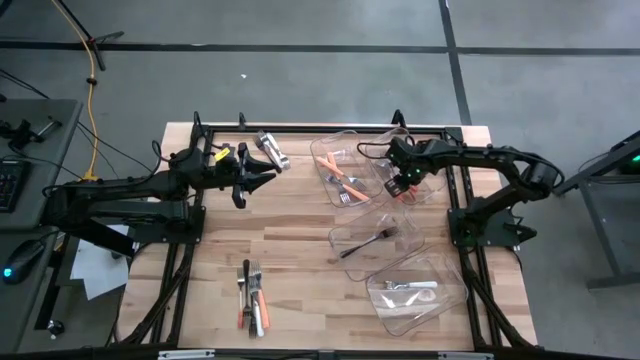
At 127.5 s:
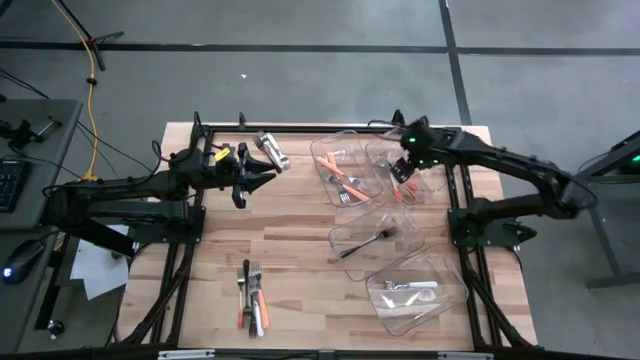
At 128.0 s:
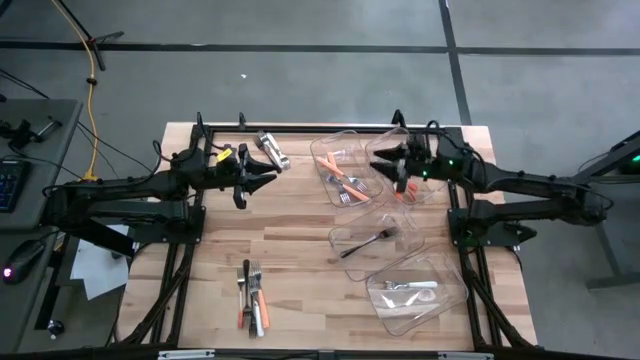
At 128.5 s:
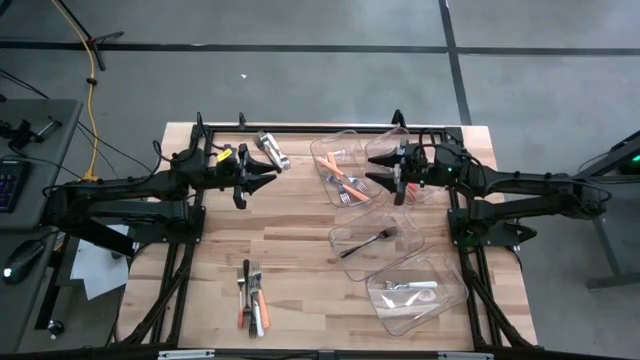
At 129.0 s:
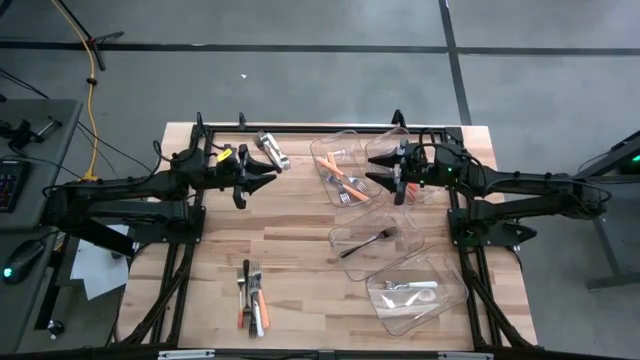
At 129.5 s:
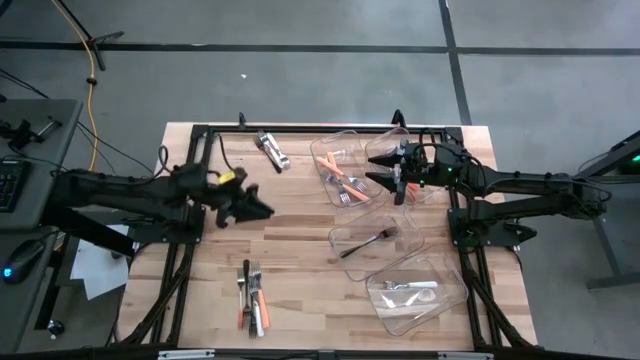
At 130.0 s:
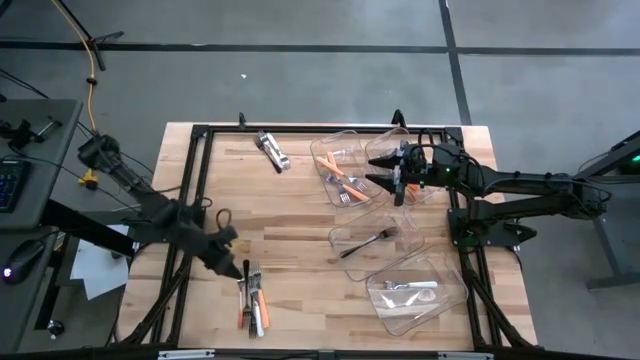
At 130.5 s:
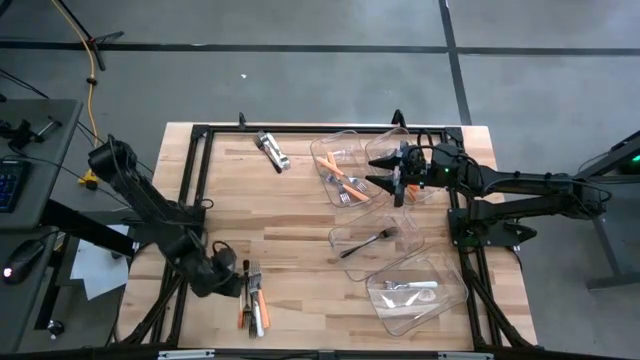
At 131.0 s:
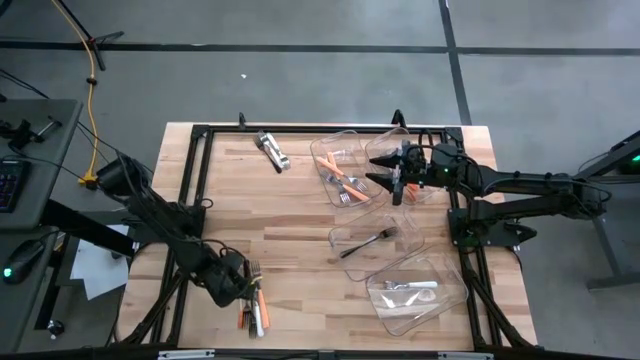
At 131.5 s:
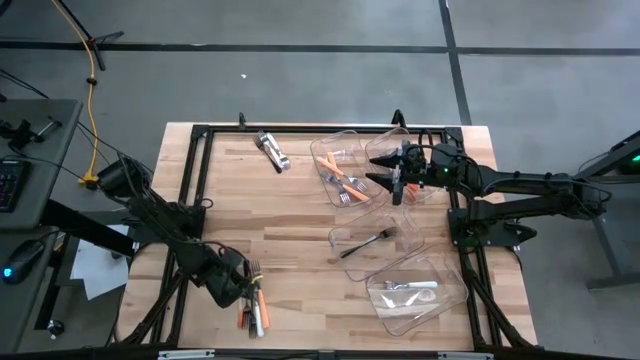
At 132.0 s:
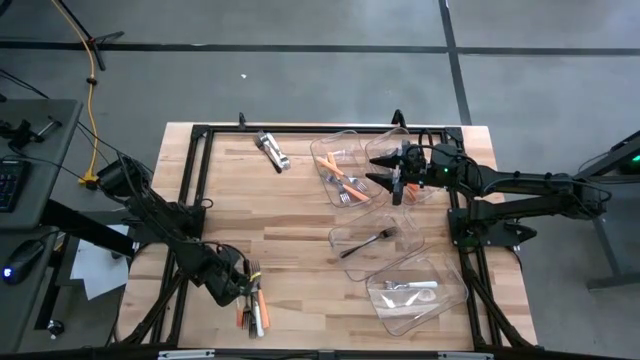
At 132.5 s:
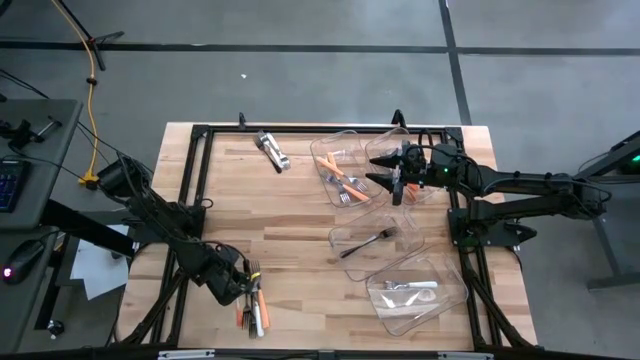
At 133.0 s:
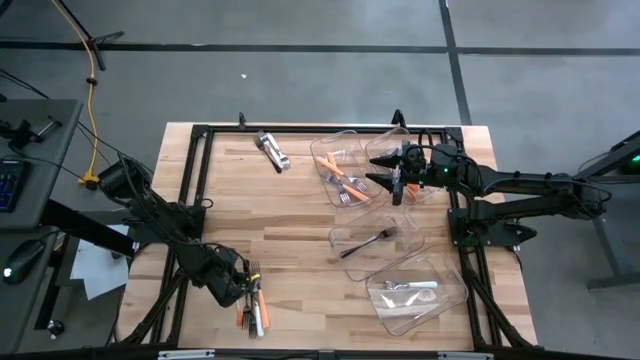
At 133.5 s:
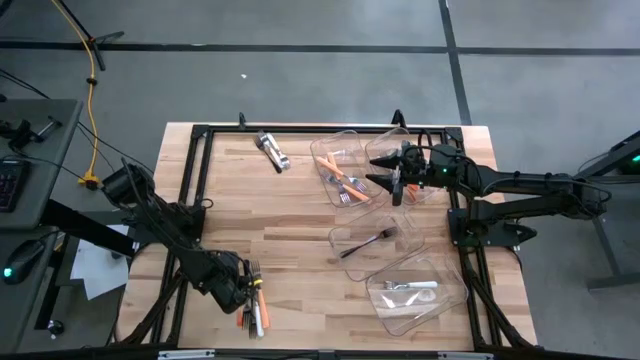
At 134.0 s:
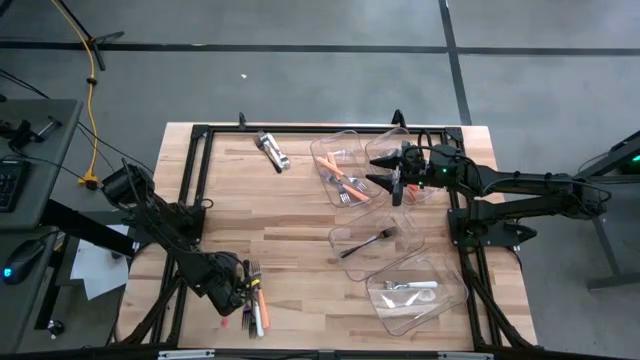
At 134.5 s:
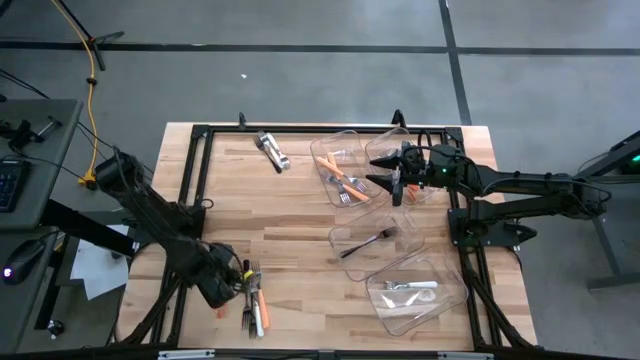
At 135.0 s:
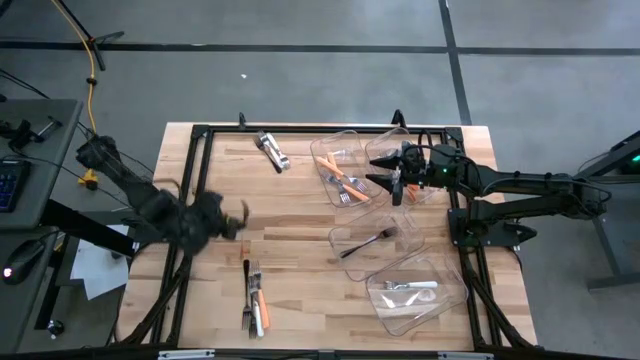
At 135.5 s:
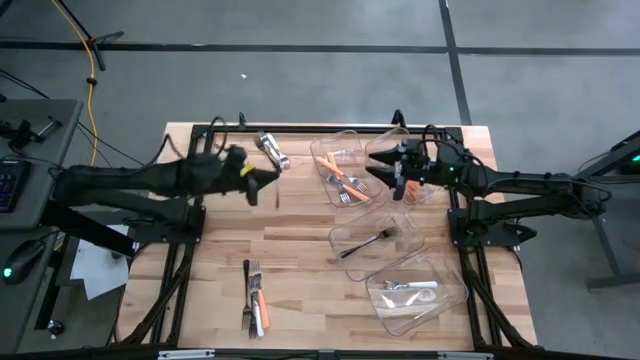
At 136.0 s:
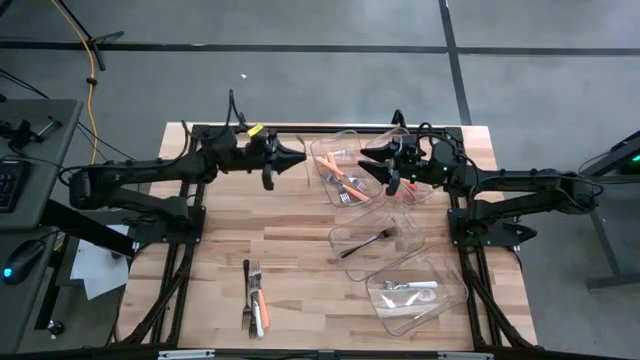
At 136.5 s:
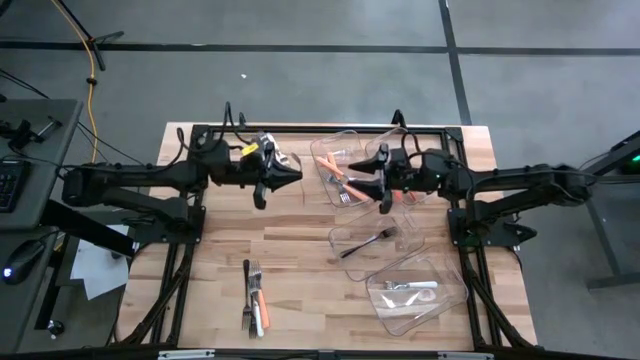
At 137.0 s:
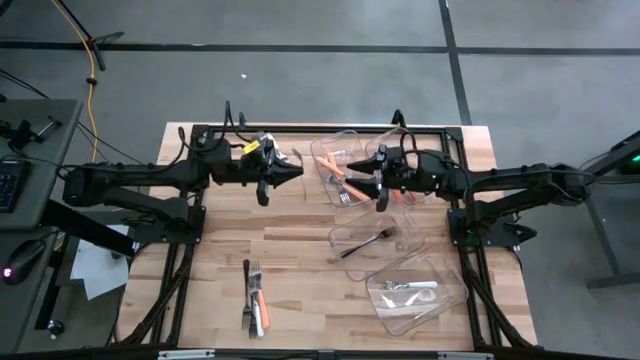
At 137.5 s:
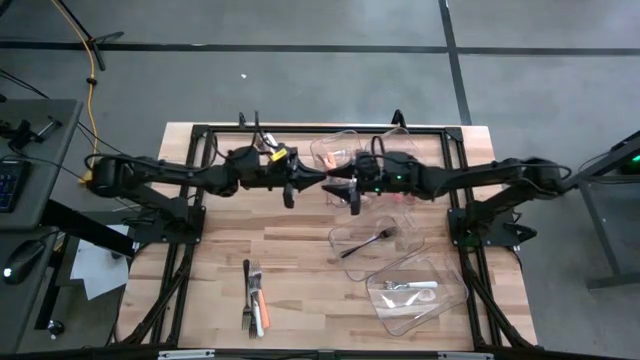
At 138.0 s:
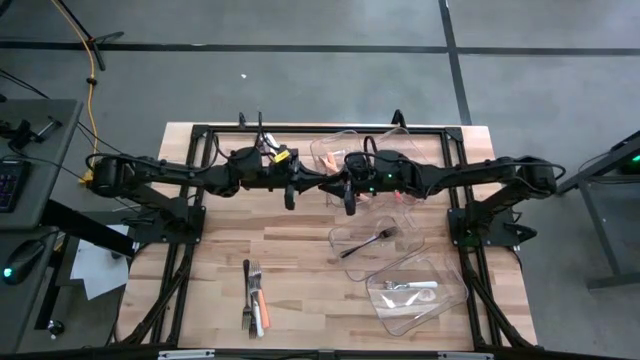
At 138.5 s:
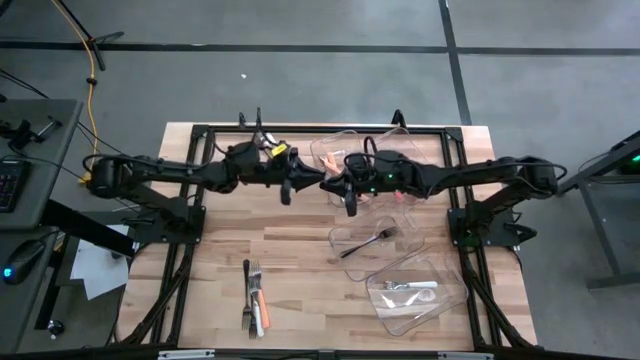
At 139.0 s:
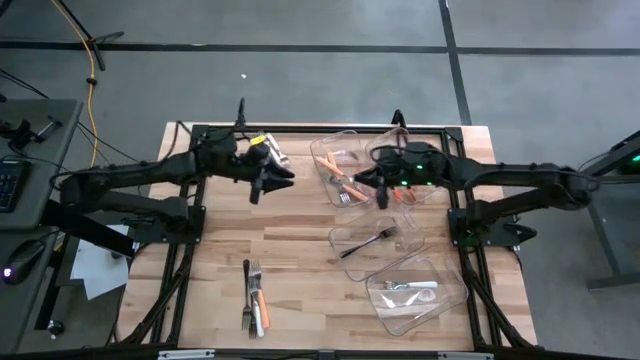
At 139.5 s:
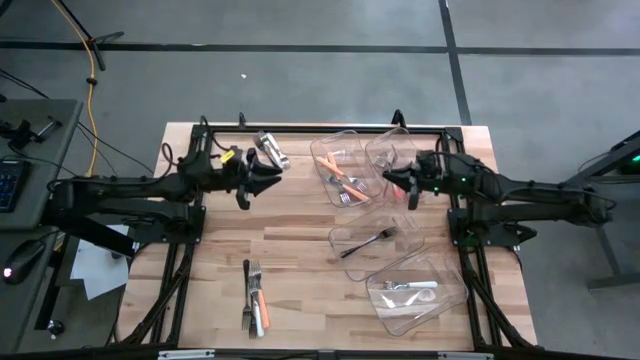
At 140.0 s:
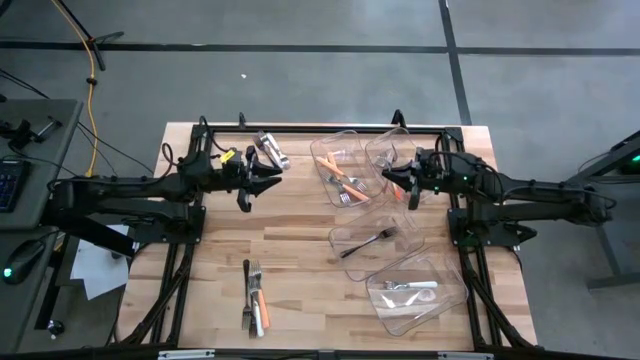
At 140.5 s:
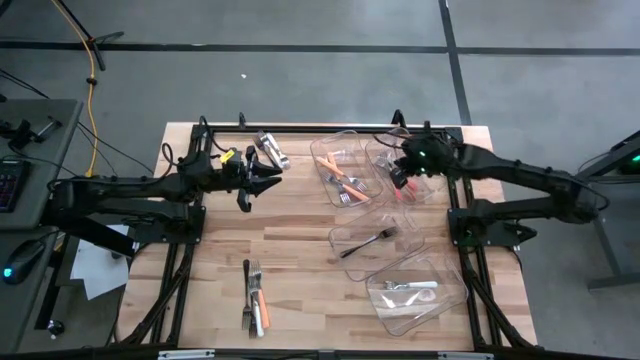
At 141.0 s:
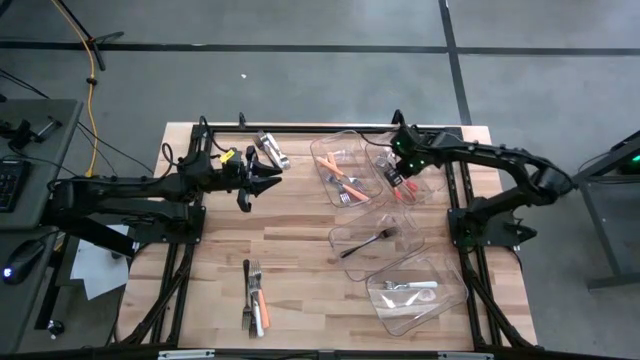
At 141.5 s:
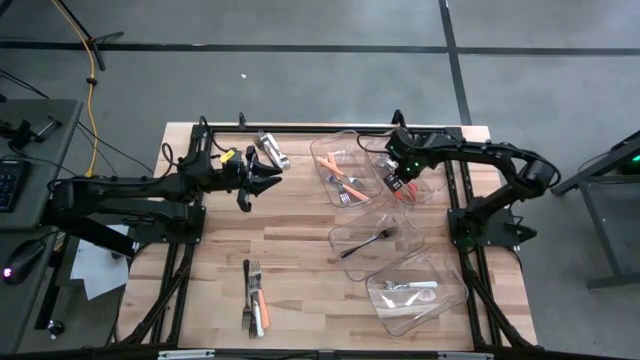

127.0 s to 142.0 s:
Task: Sort silverware by color (type)
Put the orange fork into the right transparent bin

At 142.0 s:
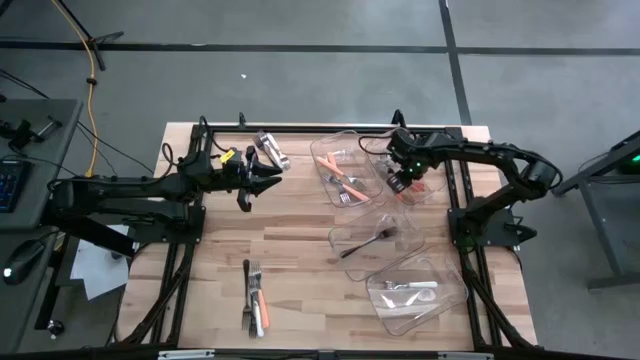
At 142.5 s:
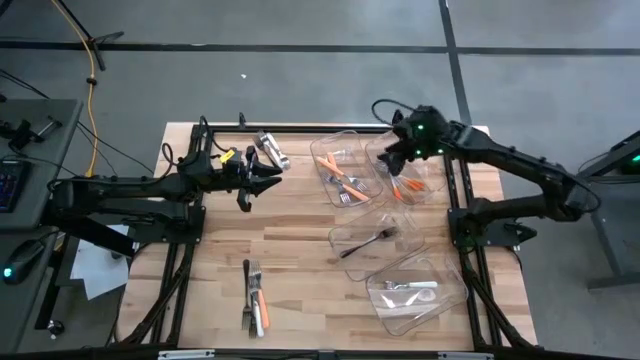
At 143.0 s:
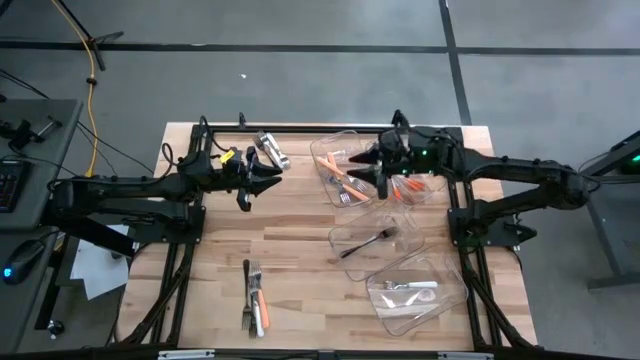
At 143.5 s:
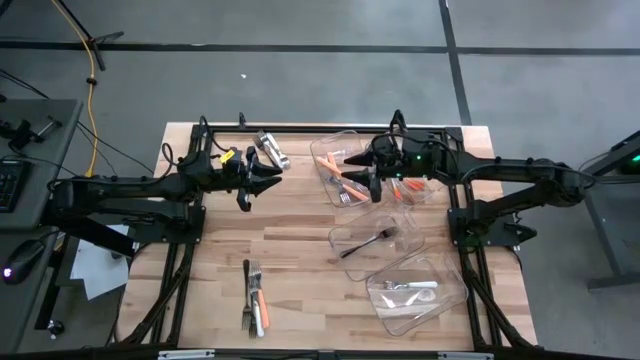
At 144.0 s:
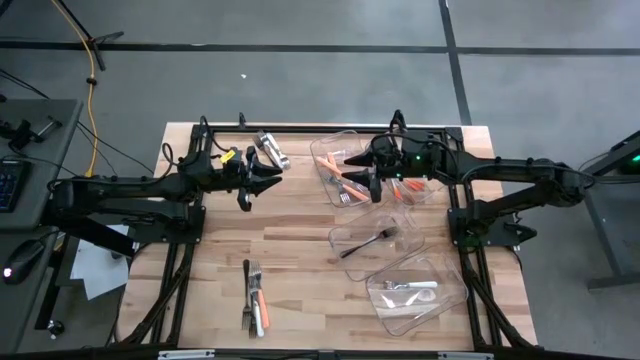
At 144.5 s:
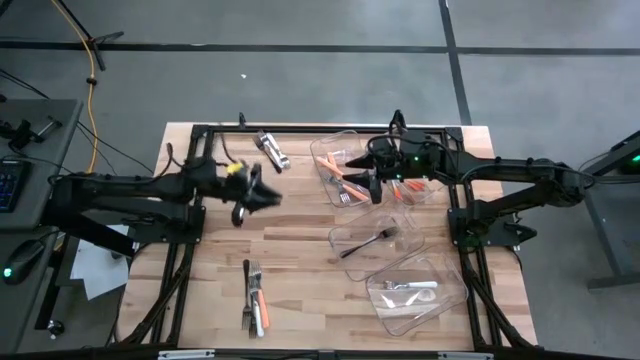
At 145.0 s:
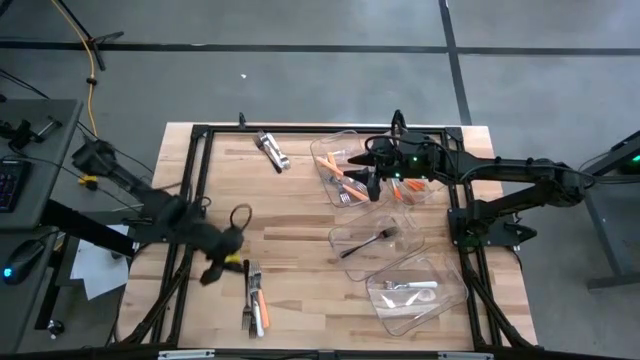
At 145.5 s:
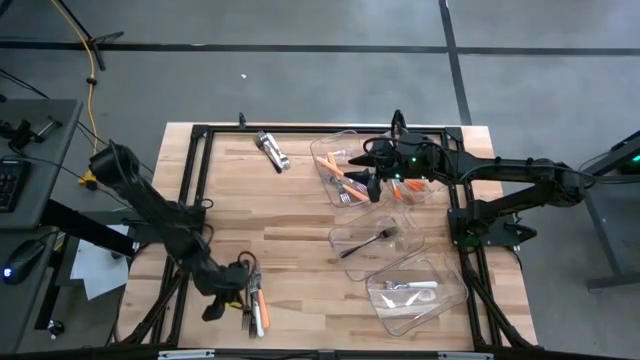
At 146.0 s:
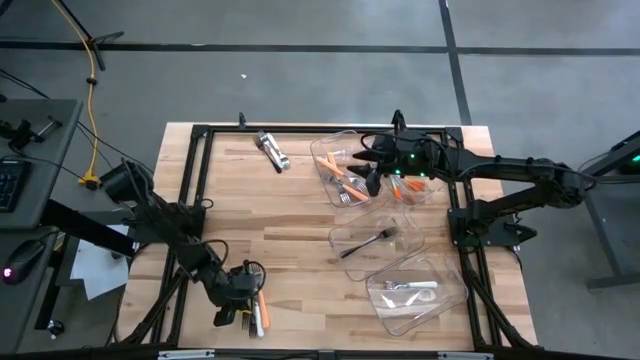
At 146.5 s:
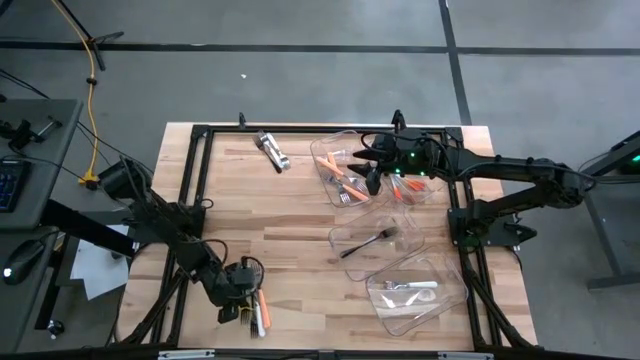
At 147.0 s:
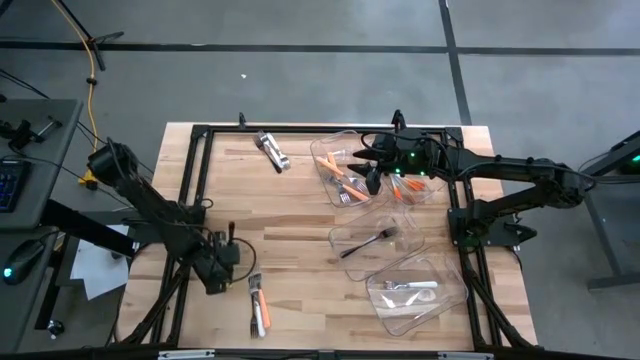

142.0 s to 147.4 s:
Move the black fork to the middle of the table

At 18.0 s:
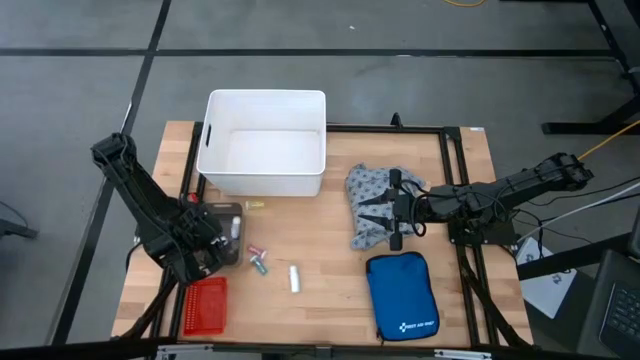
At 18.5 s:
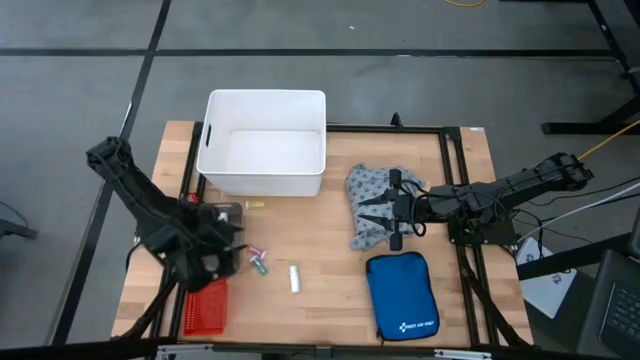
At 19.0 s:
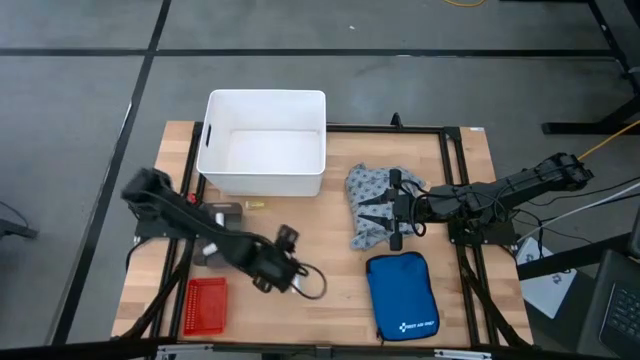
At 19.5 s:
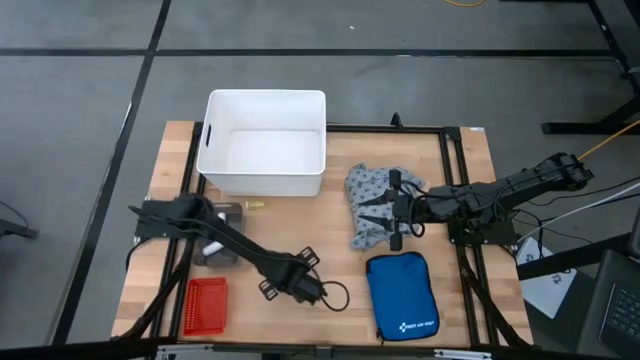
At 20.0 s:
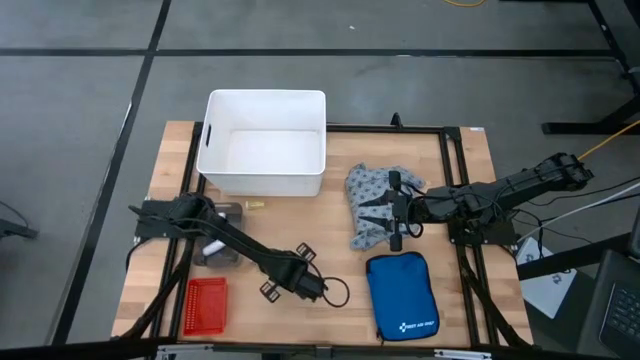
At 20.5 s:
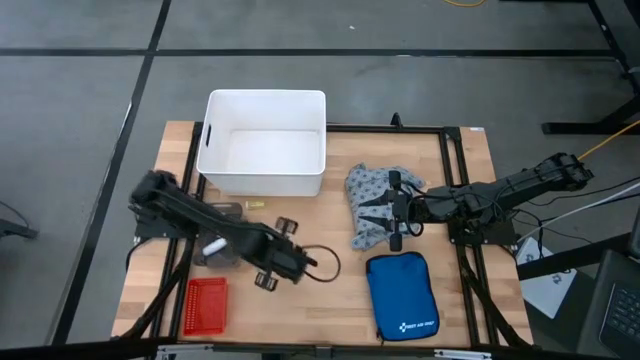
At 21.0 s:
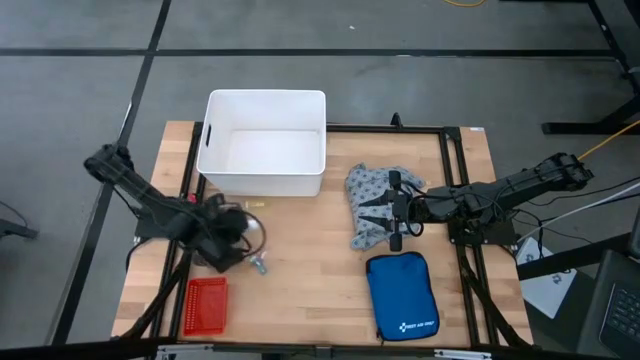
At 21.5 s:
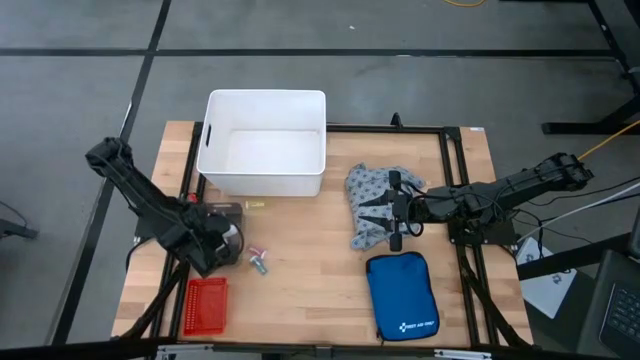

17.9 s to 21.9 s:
Task: Pick & place medical supplies in basket/bin
Put the white bandage into the black bin
